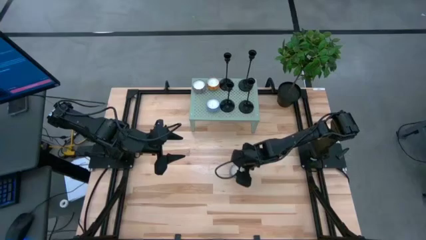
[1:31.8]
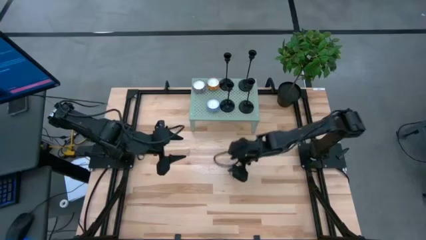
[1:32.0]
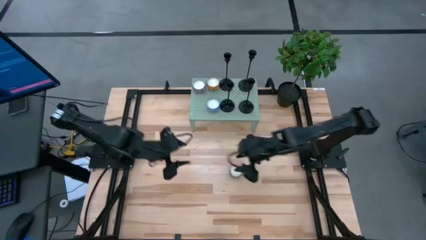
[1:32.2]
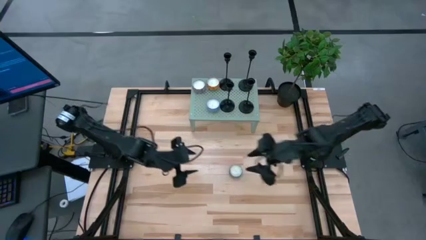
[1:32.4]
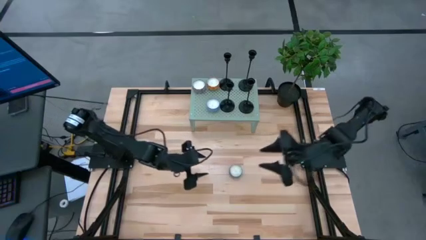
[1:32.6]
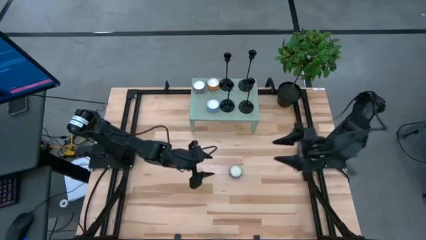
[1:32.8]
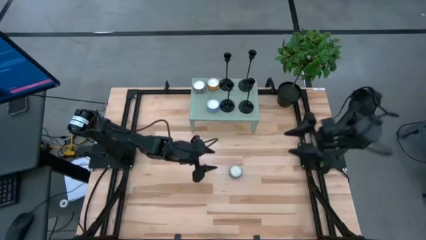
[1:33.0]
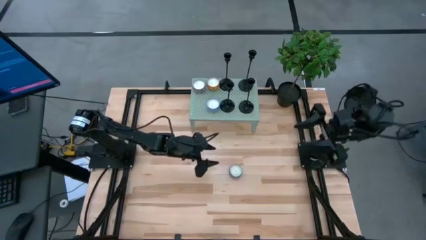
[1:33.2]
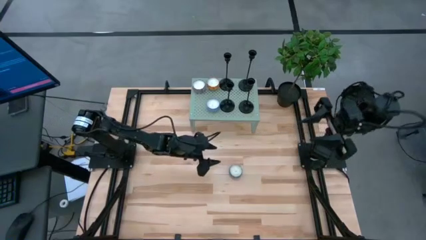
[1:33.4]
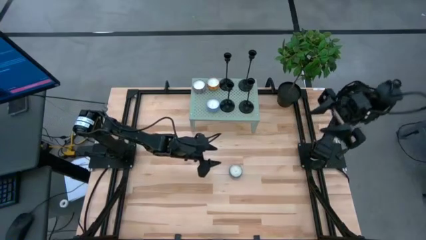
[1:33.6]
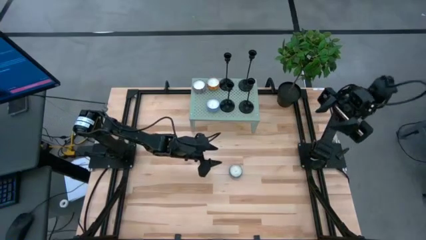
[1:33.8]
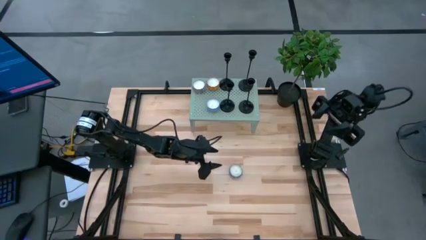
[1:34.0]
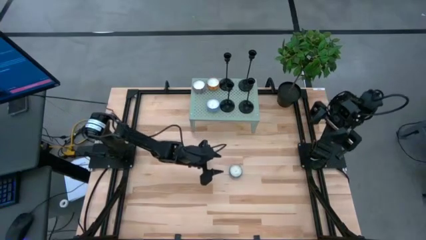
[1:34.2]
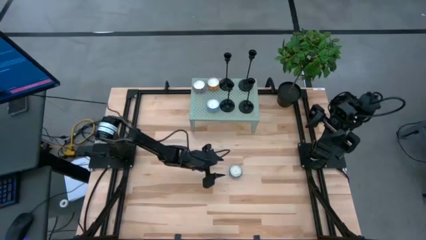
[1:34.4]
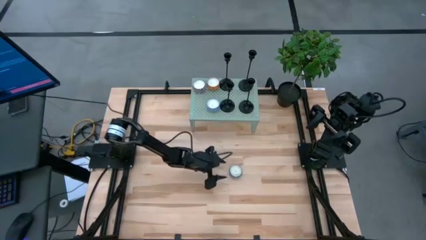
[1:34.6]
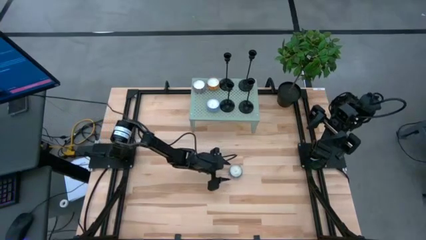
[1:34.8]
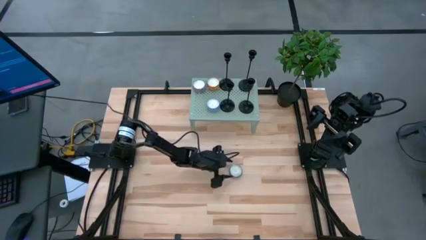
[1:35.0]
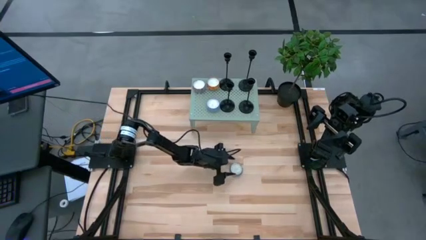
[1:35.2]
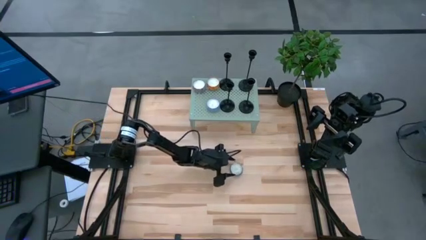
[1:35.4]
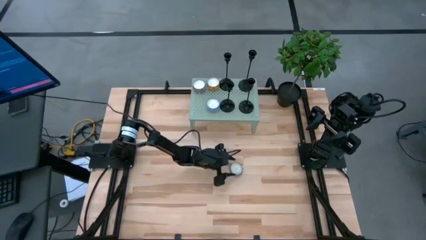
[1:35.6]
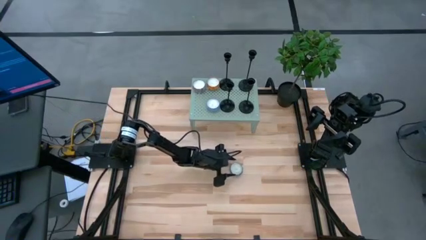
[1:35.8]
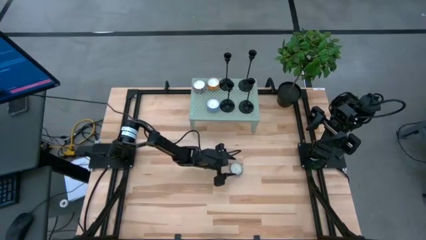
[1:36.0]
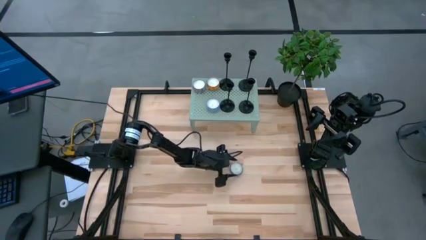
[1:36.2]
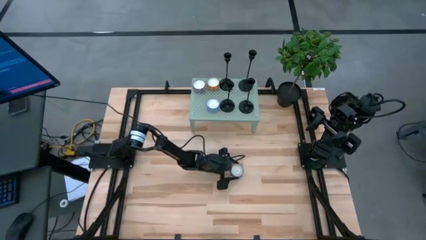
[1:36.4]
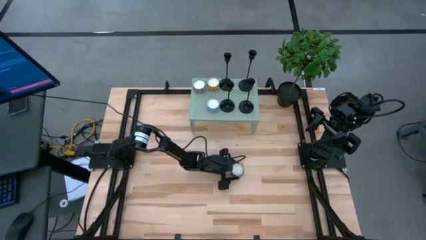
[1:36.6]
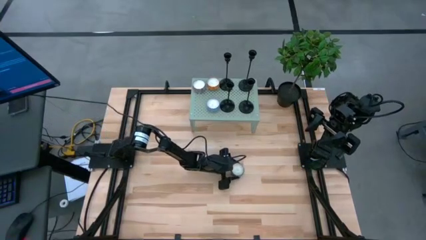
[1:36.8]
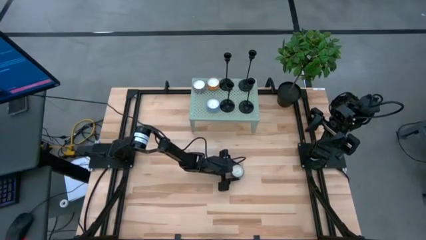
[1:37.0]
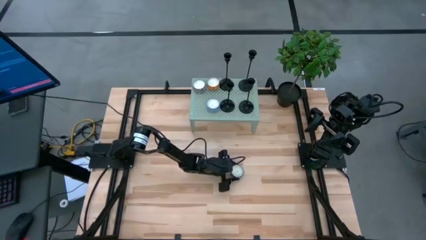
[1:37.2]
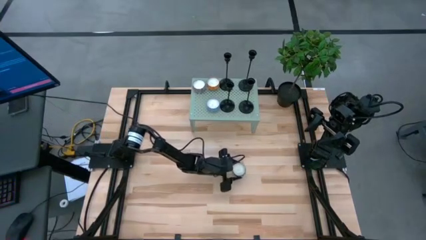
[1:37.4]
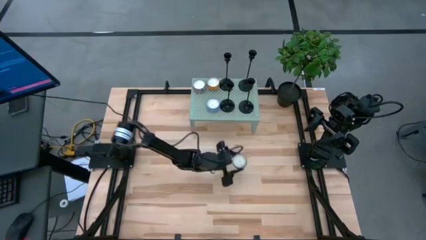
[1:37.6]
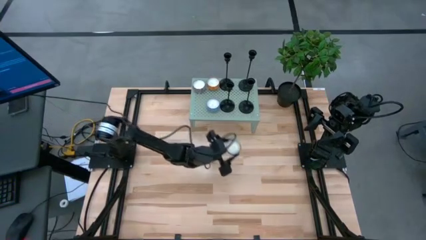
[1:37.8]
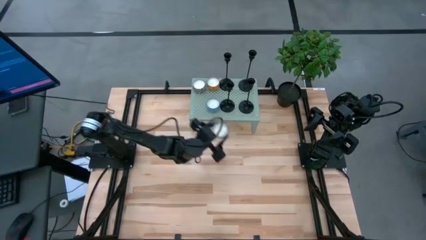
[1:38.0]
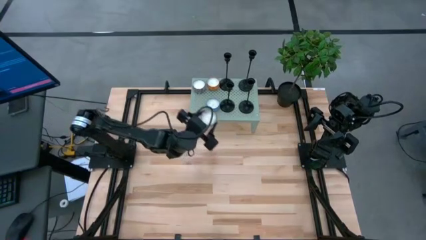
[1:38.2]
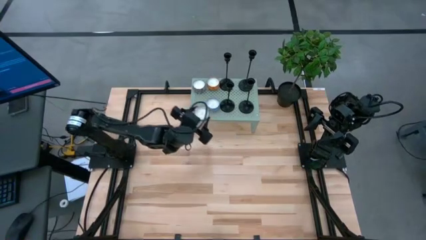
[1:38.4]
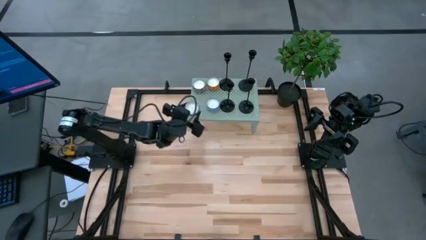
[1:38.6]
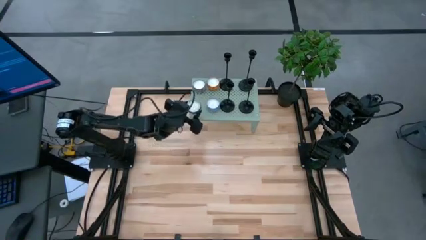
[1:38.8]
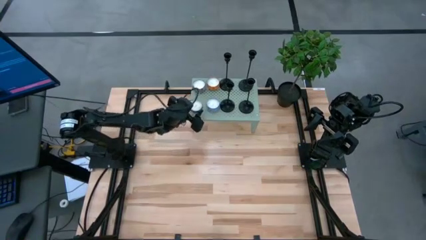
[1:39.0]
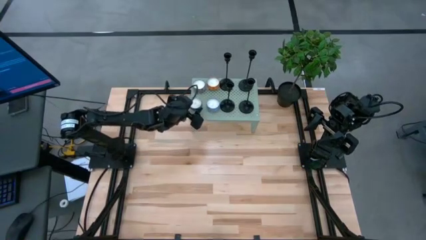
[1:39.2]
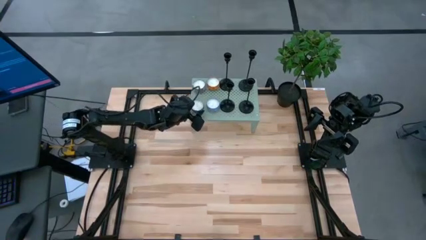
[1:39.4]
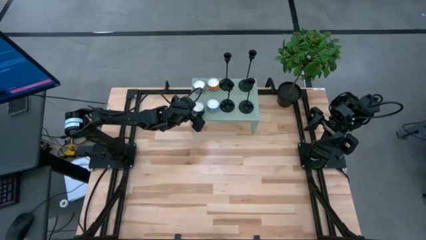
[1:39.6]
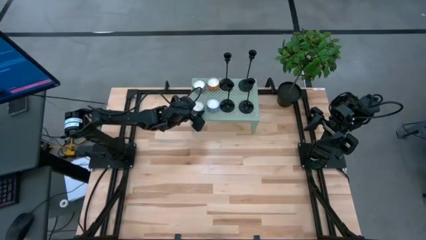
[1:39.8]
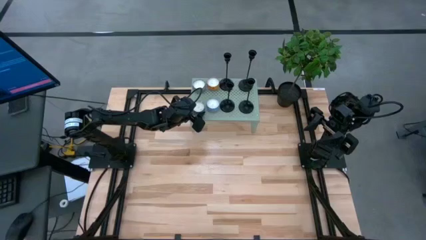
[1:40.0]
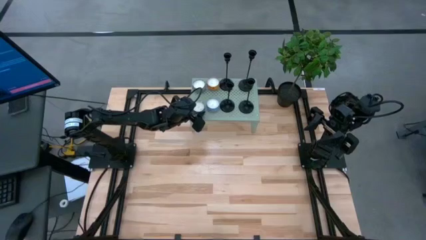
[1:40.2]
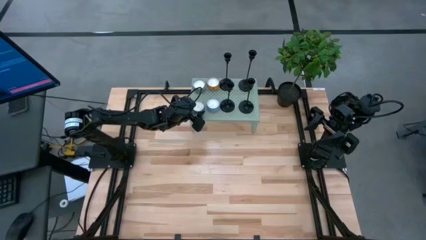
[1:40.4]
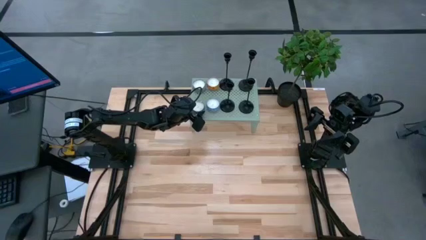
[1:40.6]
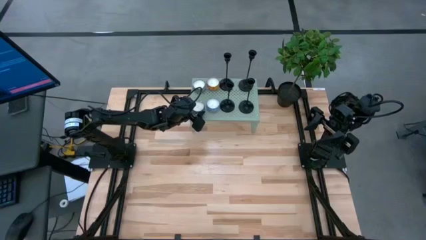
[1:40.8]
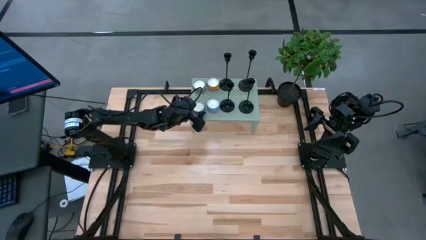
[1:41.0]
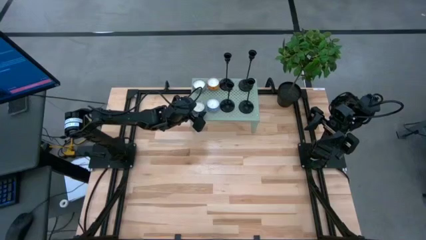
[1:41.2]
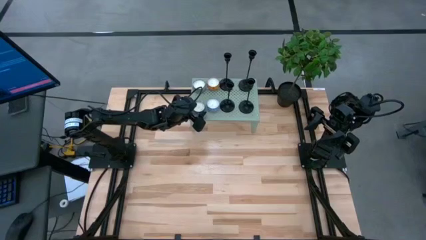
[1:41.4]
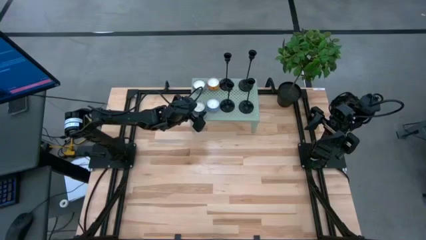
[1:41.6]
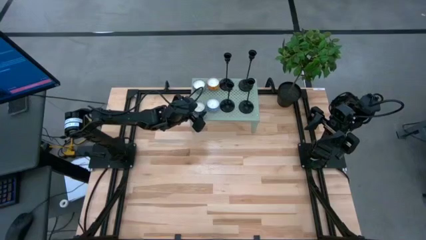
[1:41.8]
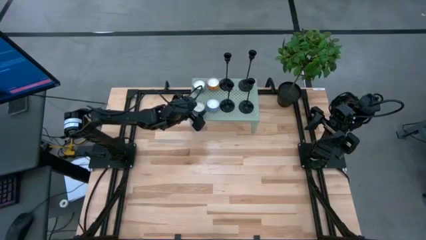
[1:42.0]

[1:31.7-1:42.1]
Task: Pick & Place candle stick holders
Put the blue scented candle on the shelf

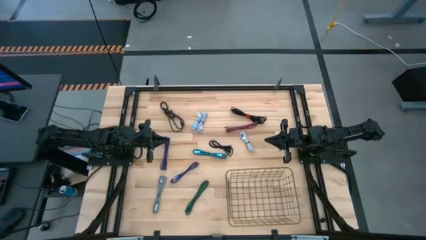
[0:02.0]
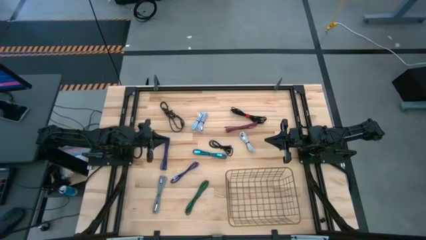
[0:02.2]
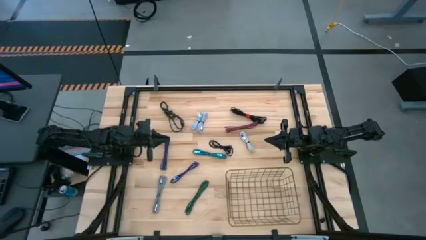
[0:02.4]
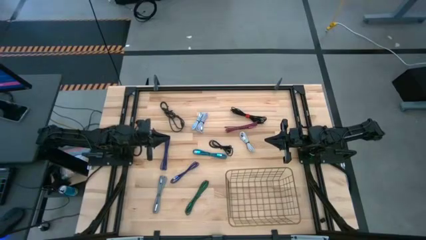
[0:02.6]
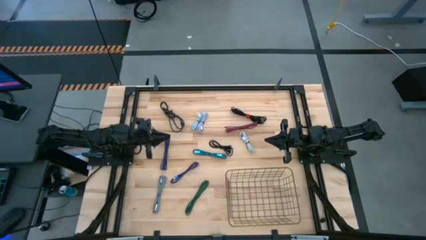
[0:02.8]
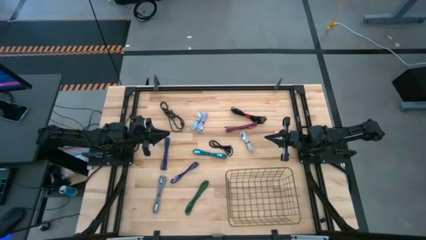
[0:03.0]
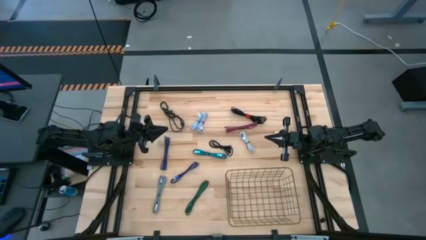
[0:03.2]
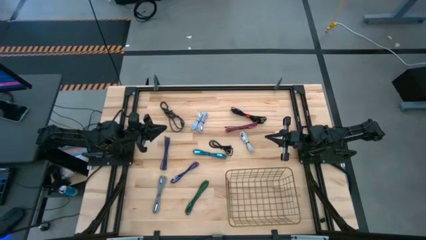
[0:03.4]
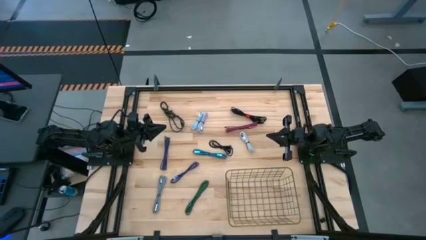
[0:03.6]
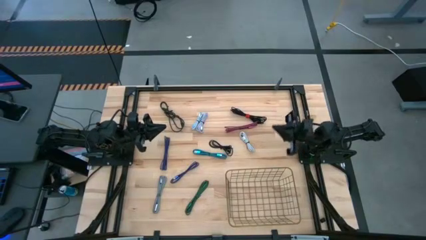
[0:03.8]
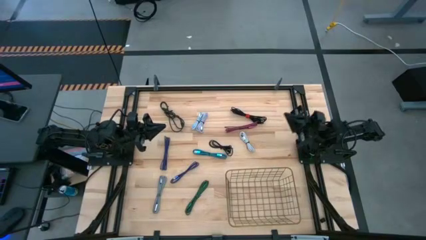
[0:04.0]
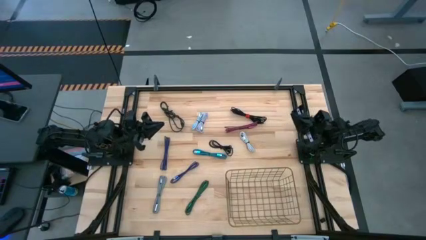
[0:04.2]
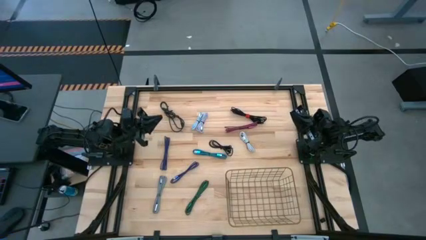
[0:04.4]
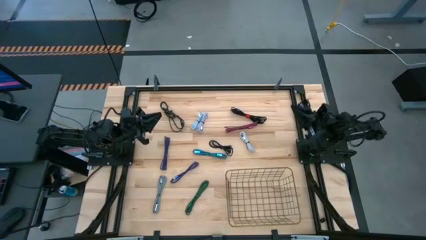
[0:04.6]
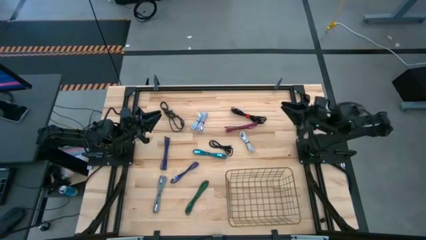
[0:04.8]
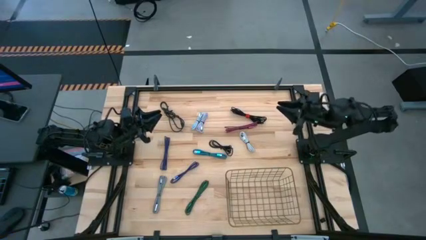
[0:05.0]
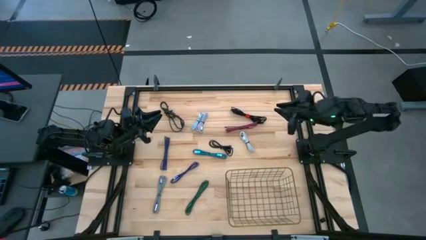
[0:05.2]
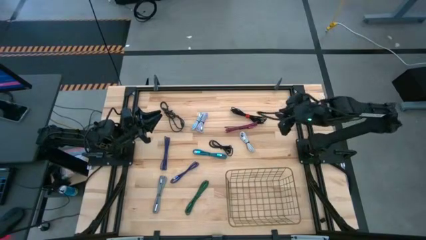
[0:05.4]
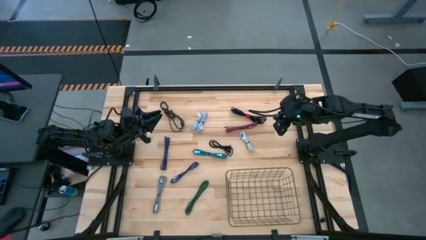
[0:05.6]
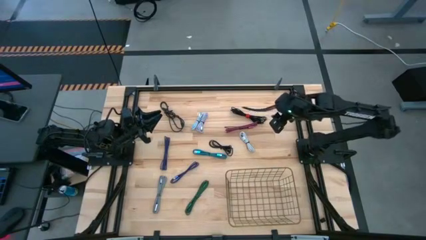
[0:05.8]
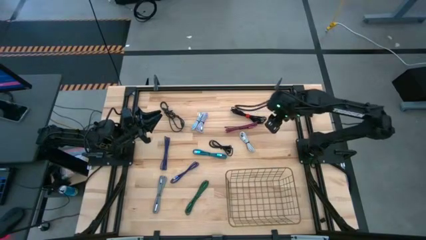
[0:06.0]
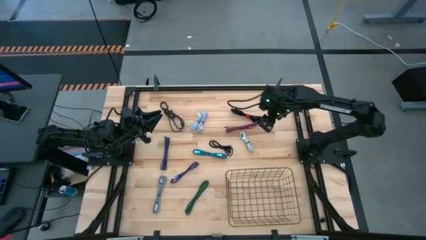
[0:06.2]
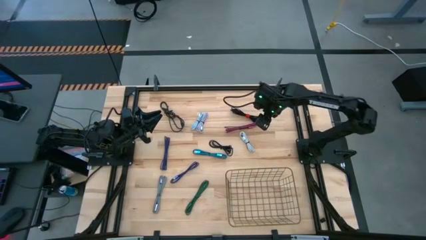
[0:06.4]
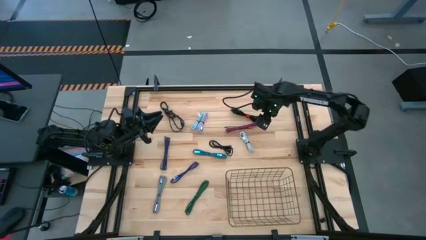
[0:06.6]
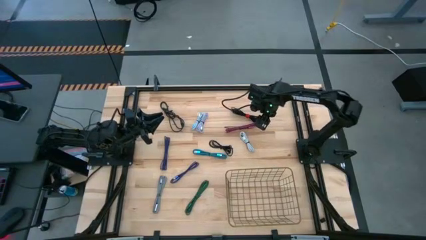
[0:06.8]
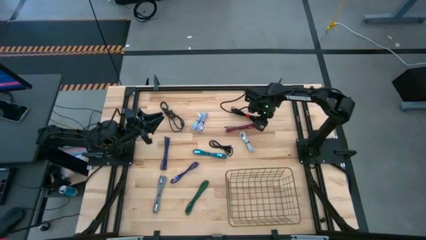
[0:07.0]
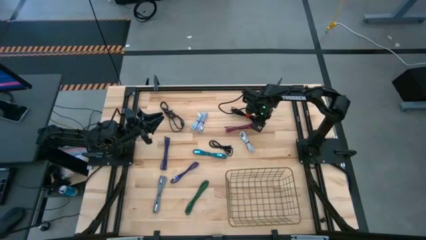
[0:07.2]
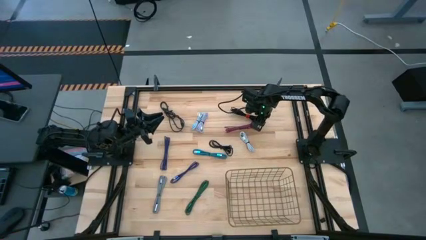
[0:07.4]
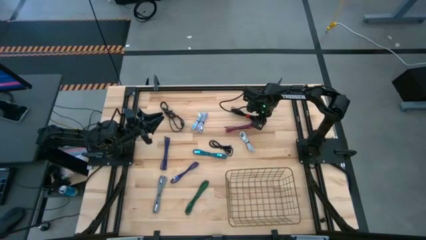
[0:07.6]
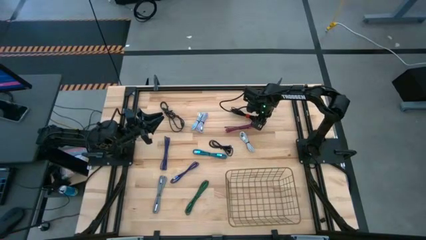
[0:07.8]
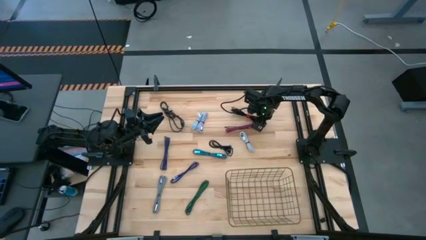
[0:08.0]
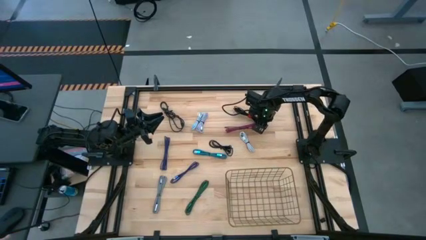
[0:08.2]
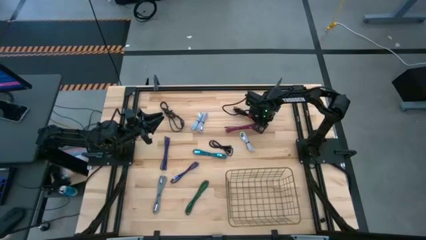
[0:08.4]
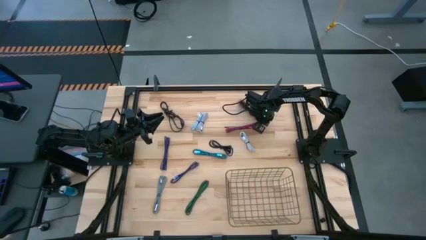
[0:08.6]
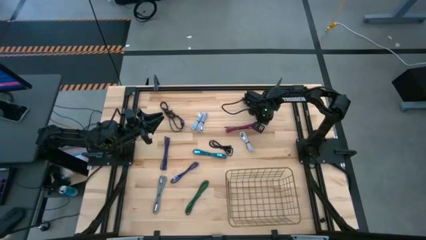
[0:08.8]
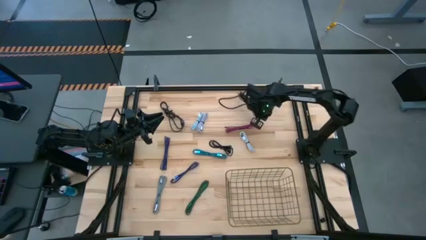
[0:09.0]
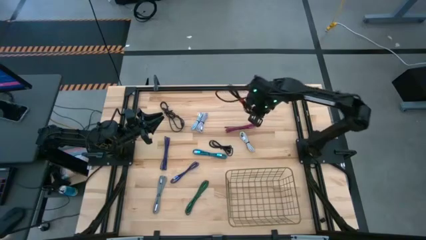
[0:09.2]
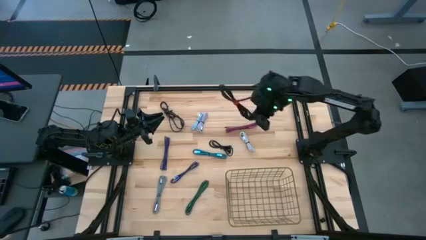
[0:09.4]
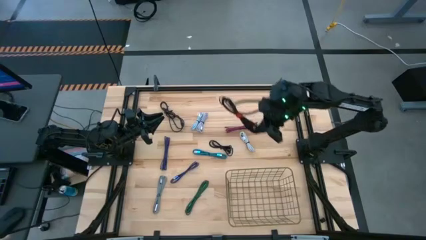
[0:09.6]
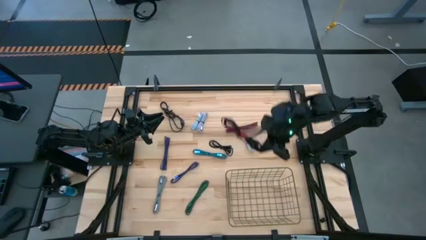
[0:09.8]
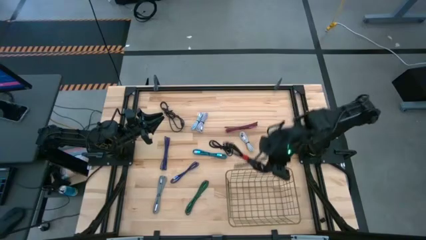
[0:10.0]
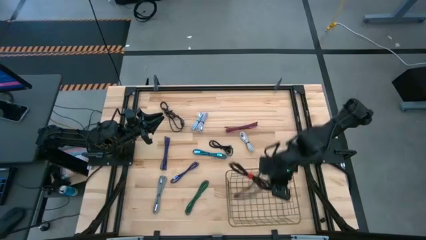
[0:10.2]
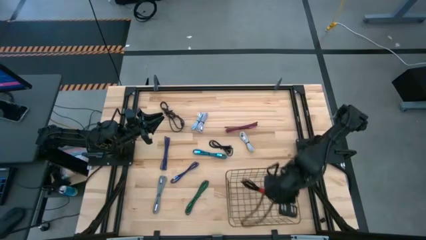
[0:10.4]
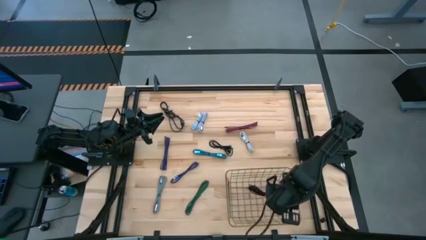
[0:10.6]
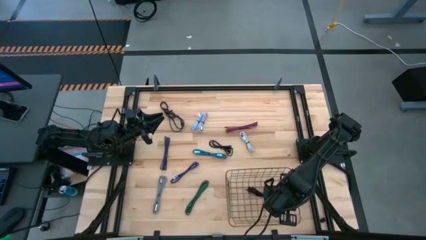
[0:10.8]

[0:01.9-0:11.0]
Task: Pick and place USB-C Cables
Put the right black charger cable into the wire basket
